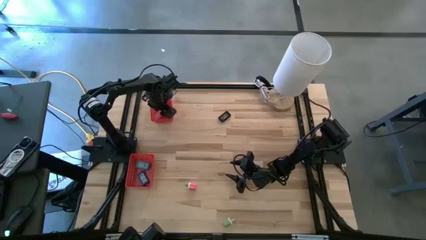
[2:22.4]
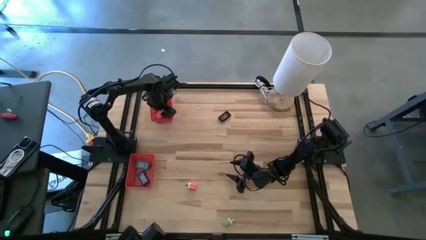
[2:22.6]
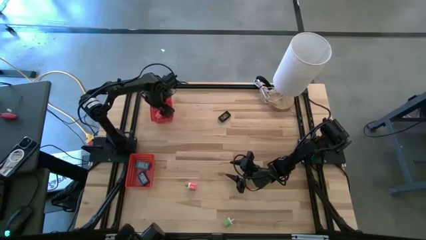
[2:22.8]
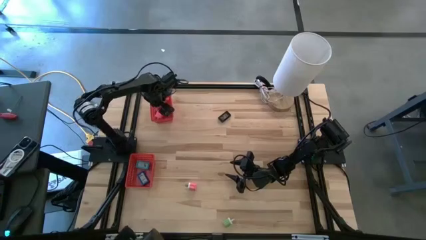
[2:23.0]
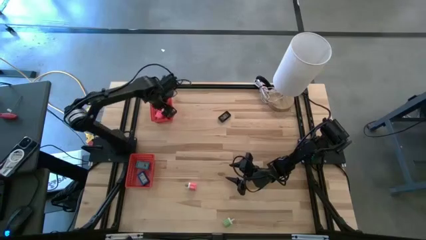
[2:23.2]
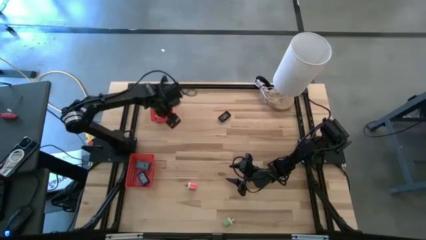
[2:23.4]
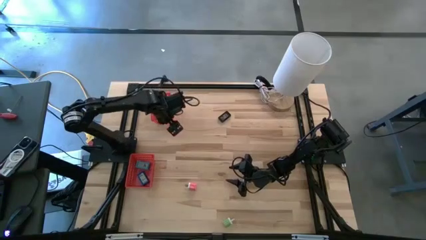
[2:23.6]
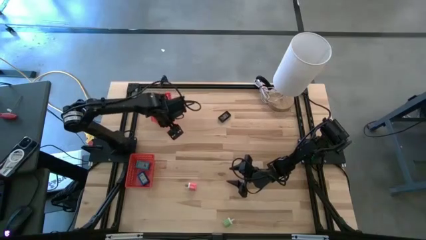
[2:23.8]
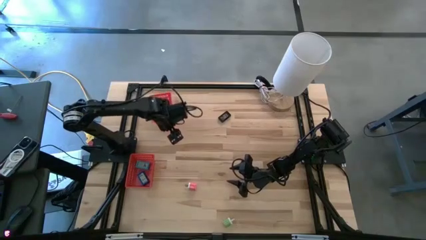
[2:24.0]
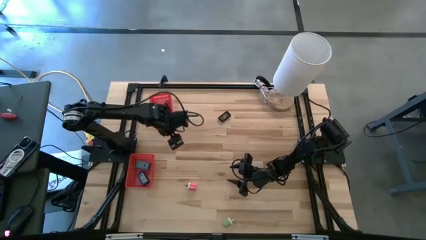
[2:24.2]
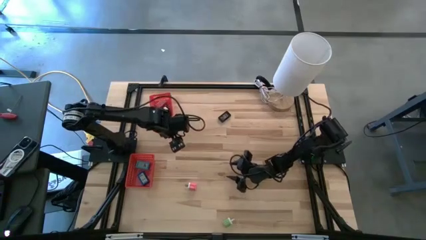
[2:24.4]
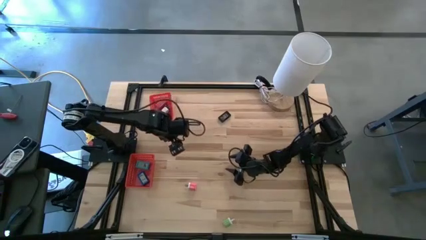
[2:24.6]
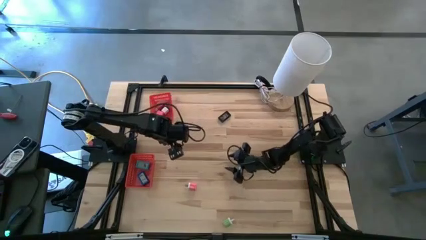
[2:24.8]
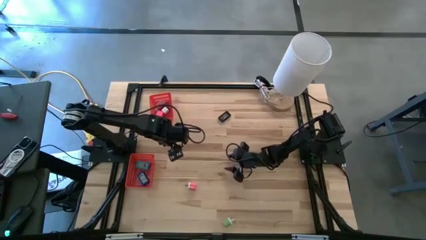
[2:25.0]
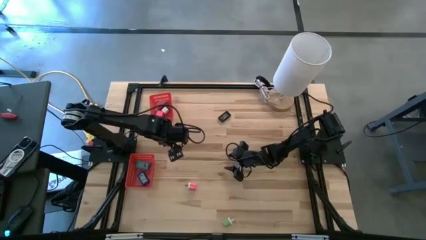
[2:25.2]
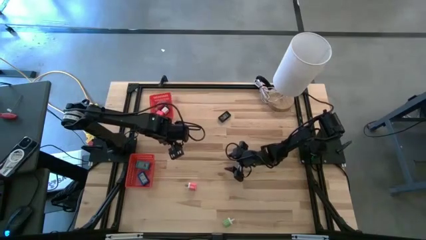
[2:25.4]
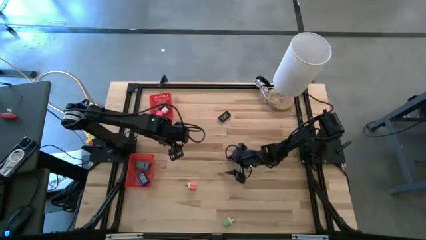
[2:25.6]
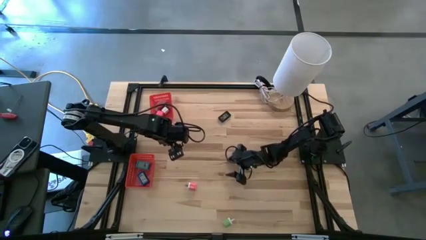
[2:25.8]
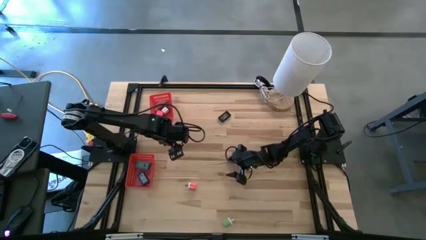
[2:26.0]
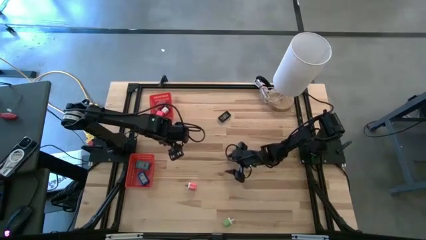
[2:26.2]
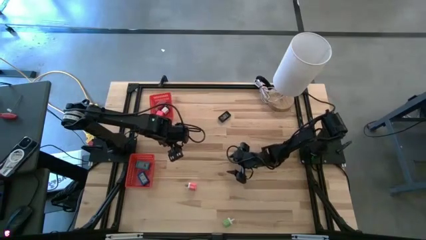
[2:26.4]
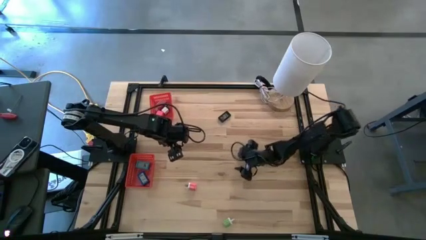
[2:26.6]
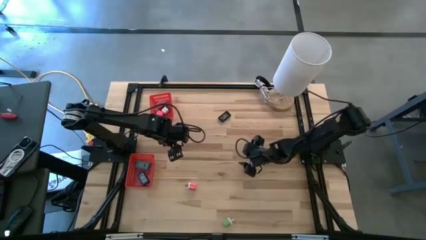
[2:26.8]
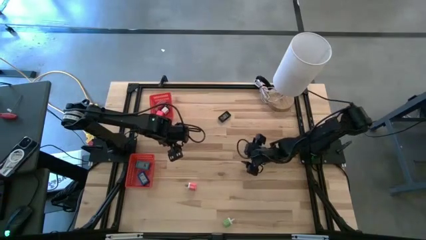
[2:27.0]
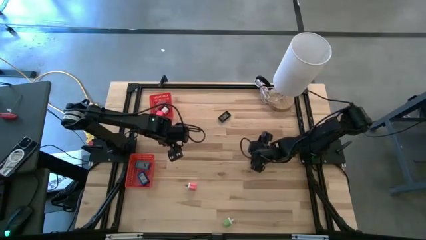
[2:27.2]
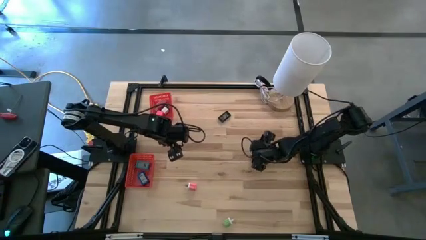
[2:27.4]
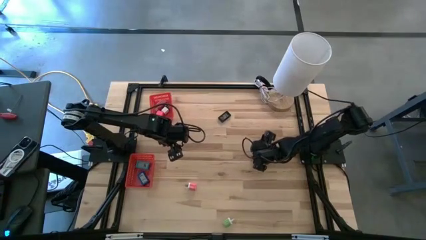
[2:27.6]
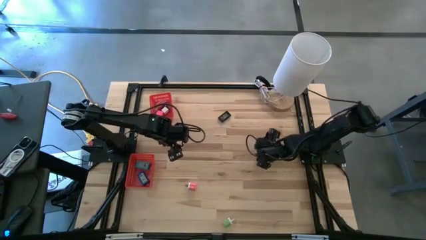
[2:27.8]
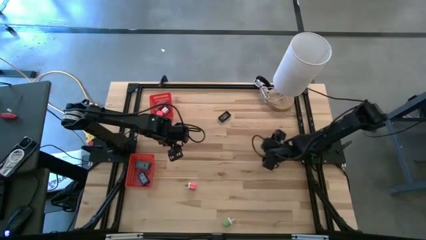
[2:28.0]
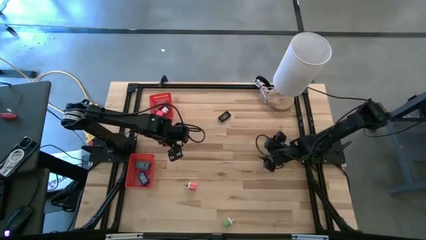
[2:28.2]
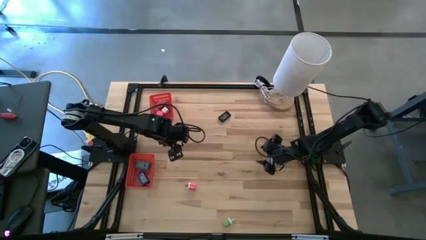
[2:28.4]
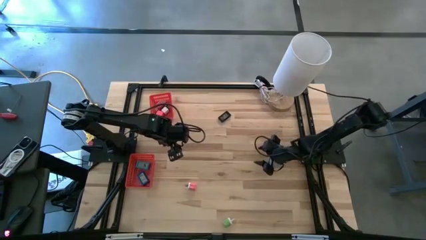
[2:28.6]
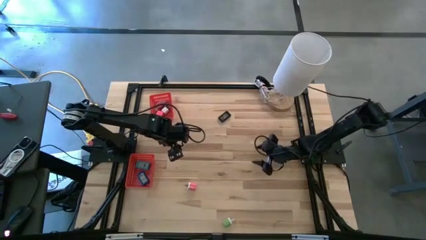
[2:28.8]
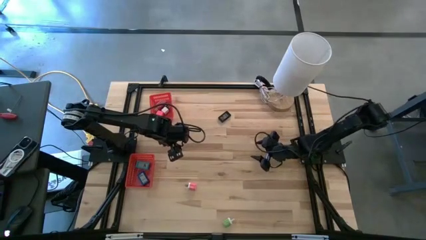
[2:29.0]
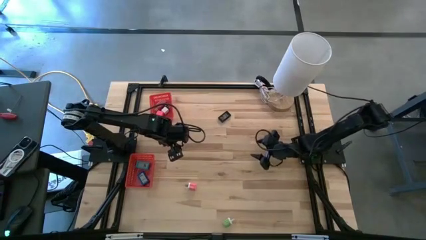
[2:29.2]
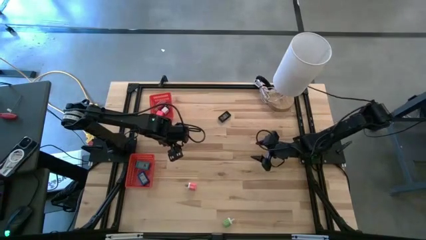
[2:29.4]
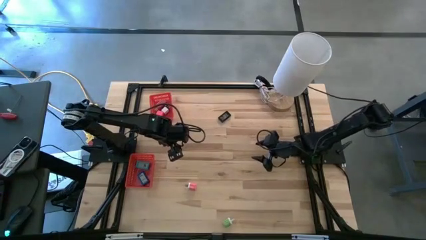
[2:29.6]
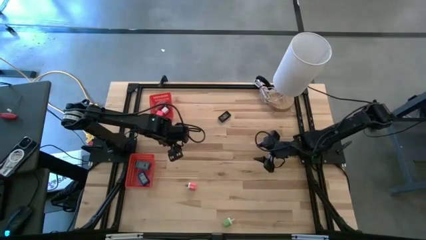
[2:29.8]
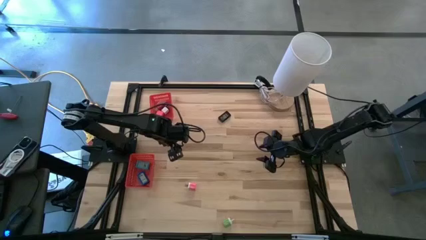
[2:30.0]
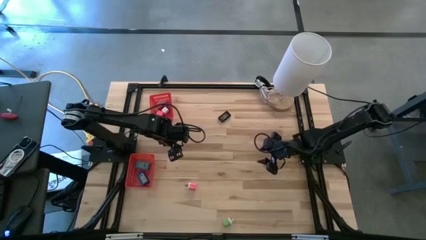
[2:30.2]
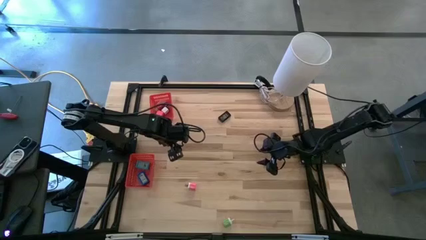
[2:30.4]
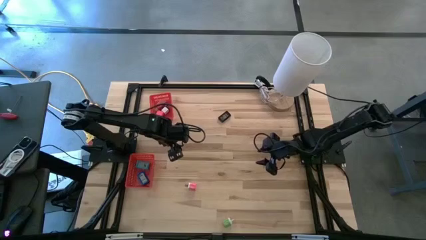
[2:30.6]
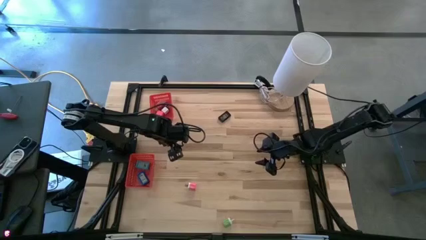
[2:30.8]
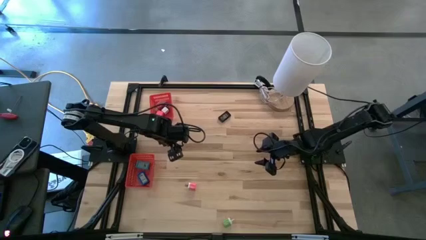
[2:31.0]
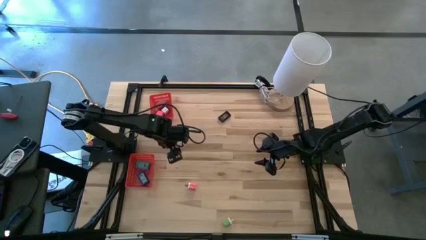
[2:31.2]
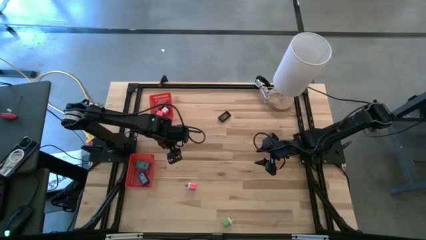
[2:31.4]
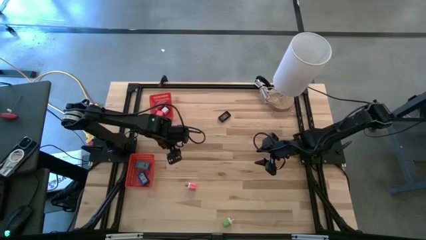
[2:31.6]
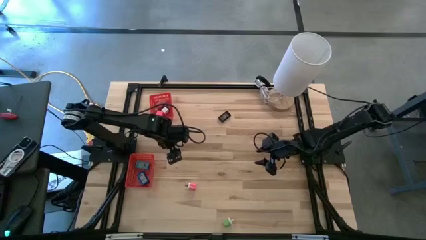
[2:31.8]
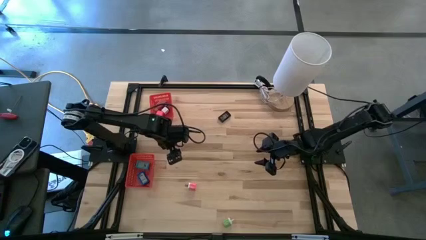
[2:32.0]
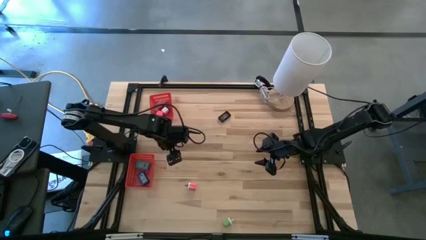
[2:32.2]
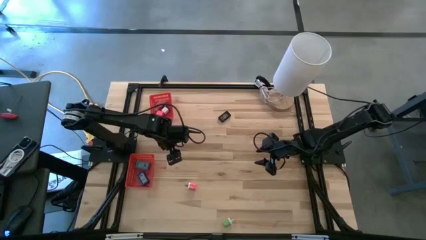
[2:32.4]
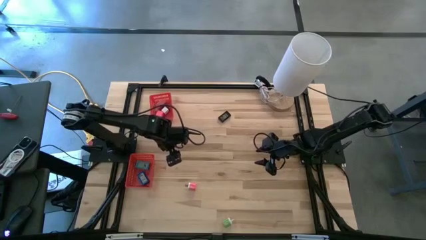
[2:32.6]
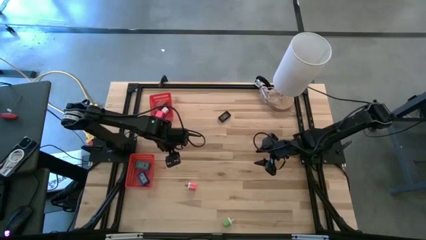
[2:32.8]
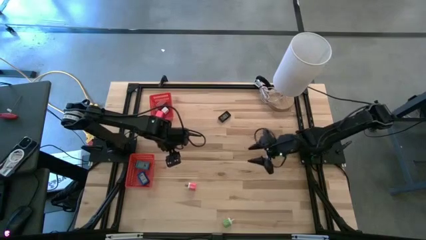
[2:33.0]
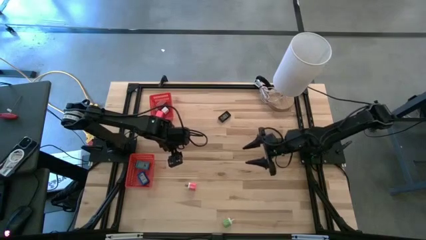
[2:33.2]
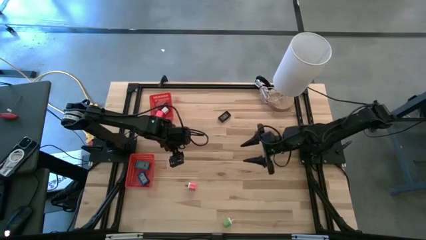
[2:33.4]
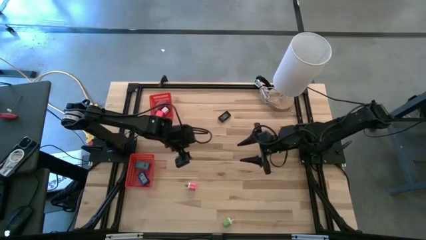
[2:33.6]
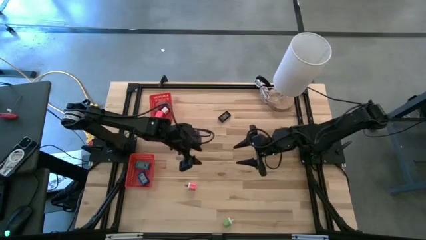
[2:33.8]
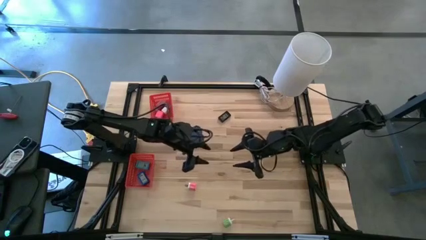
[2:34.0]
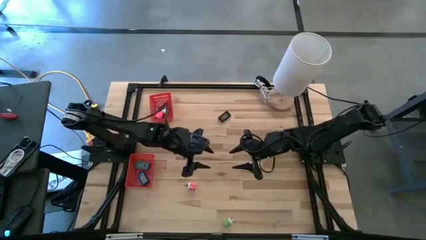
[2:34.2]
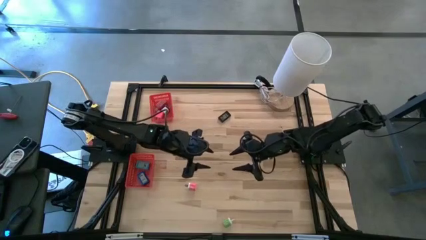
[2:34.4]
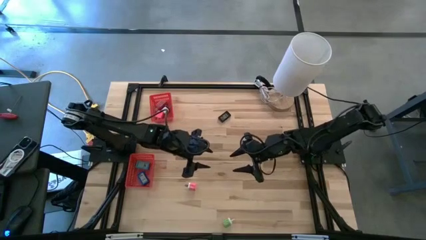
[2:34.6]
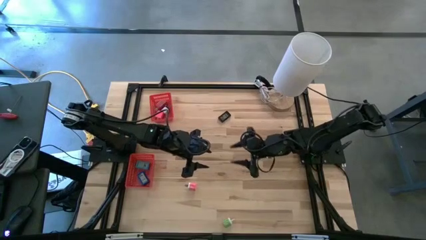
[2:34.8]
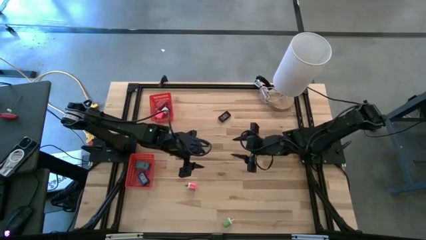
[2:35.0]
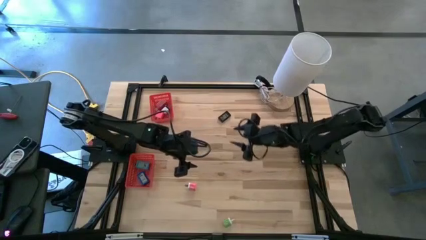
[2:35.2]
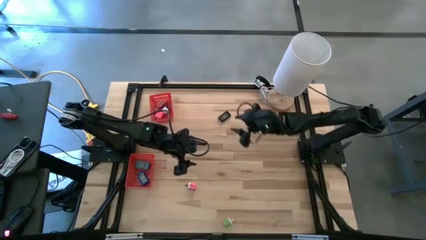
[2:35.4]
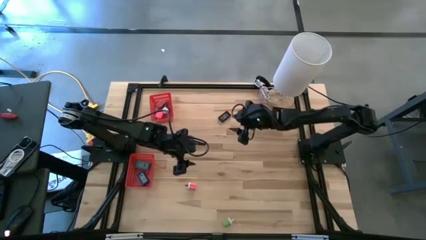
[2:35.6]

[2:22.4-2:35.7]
Task: Pick & Place Office items
Put the black digital clock into the bottom red bin
